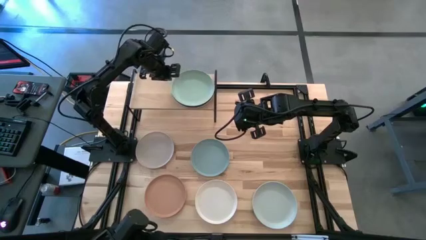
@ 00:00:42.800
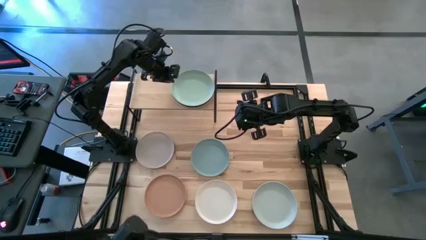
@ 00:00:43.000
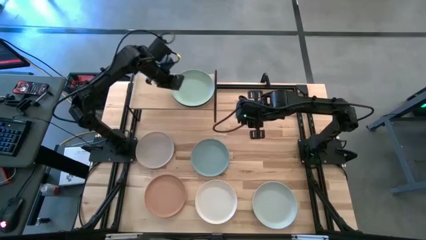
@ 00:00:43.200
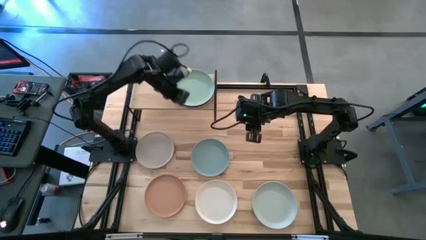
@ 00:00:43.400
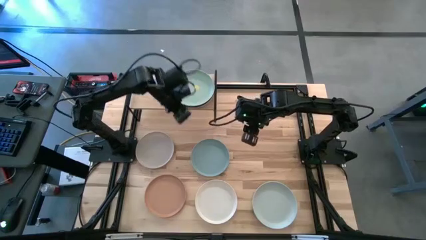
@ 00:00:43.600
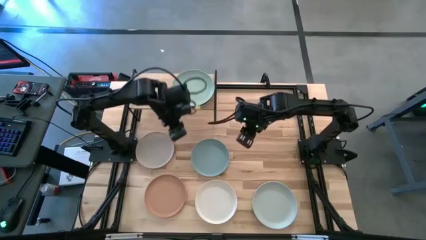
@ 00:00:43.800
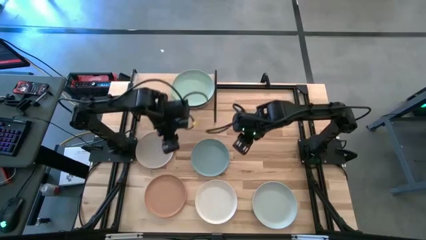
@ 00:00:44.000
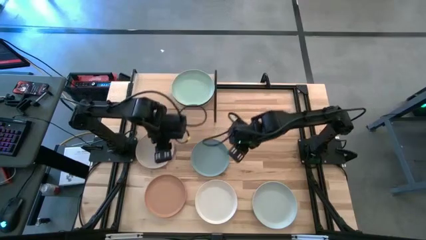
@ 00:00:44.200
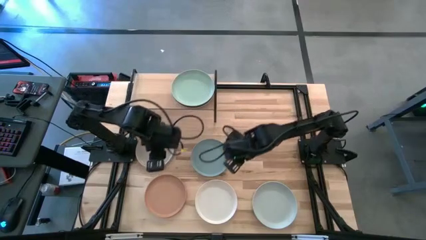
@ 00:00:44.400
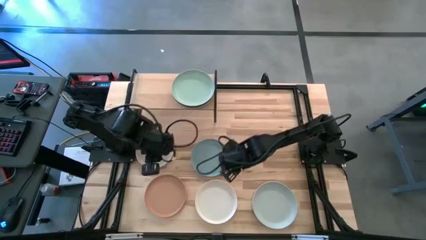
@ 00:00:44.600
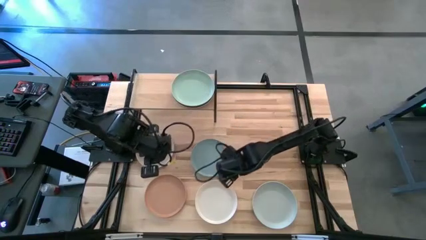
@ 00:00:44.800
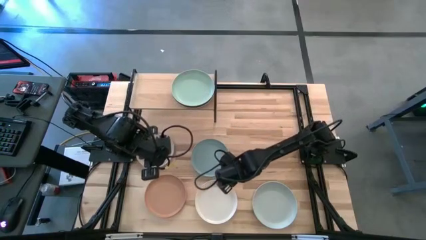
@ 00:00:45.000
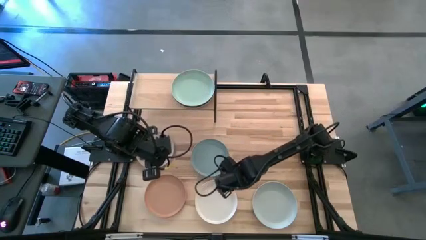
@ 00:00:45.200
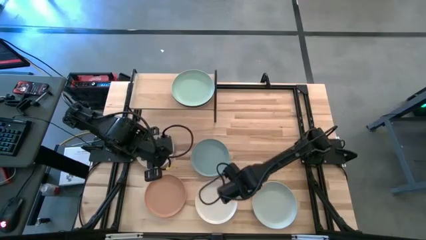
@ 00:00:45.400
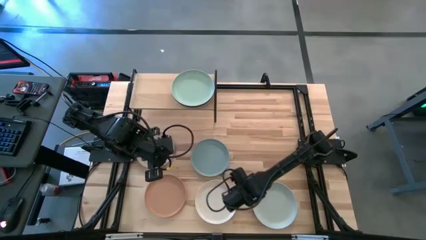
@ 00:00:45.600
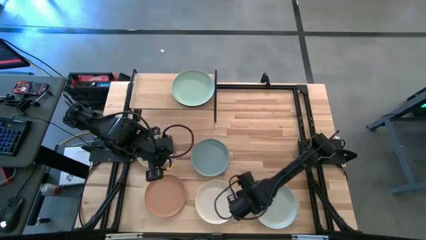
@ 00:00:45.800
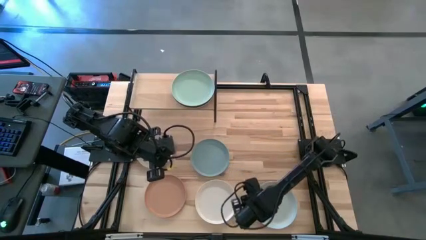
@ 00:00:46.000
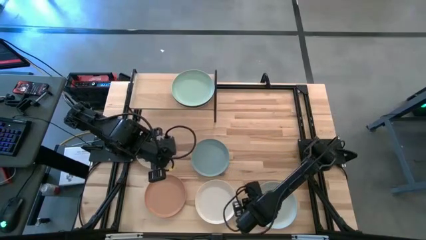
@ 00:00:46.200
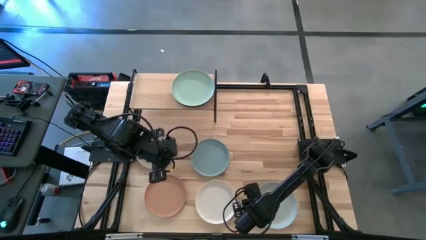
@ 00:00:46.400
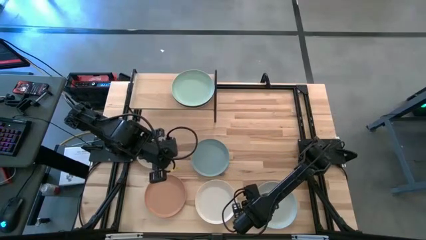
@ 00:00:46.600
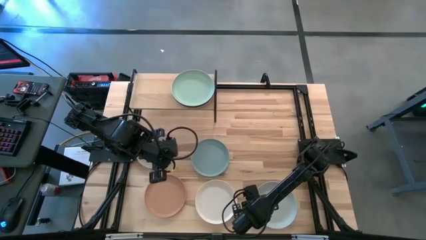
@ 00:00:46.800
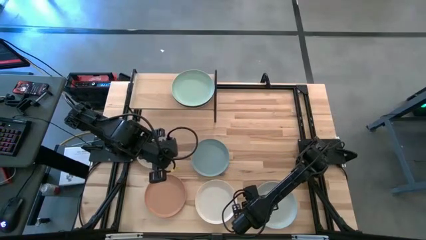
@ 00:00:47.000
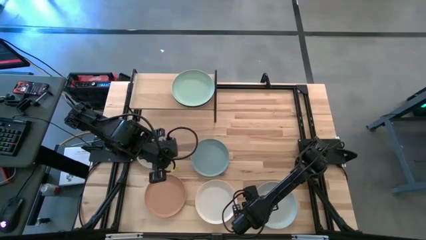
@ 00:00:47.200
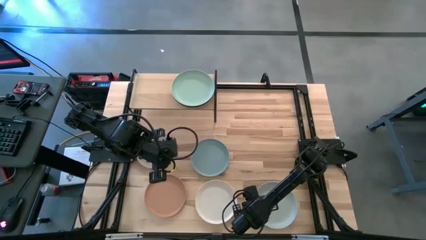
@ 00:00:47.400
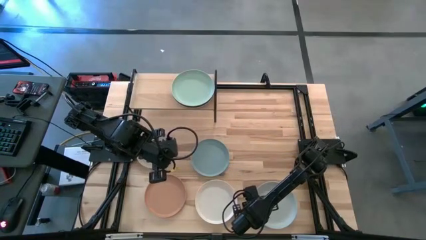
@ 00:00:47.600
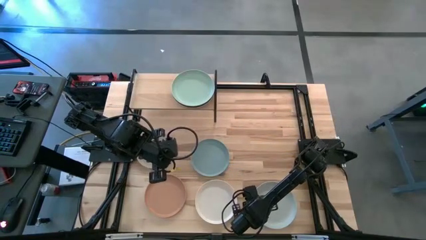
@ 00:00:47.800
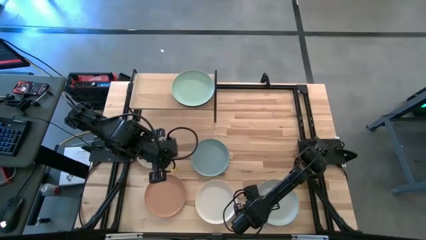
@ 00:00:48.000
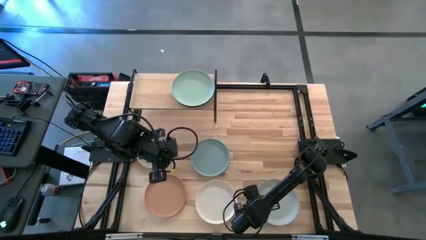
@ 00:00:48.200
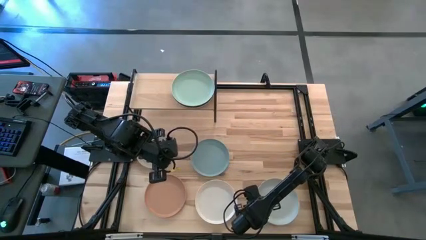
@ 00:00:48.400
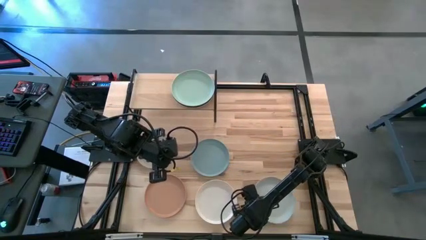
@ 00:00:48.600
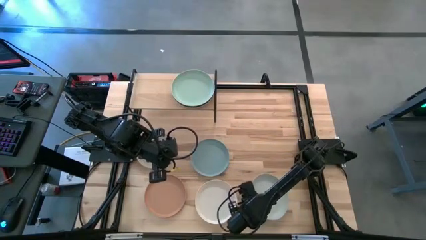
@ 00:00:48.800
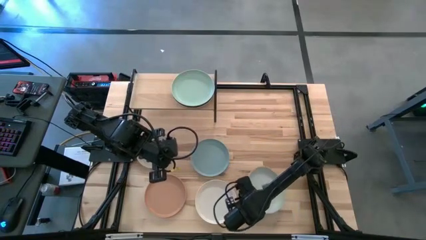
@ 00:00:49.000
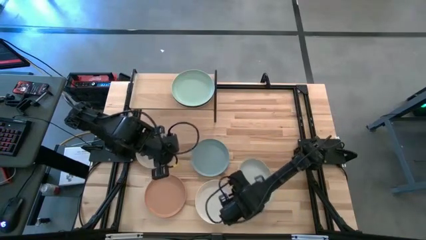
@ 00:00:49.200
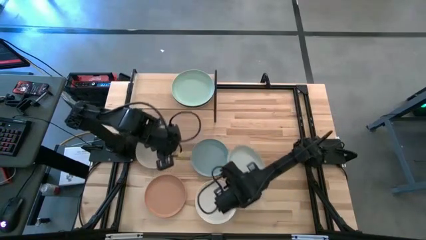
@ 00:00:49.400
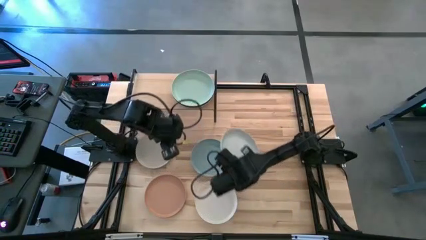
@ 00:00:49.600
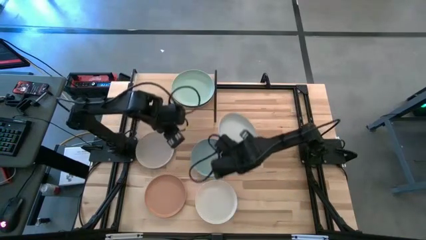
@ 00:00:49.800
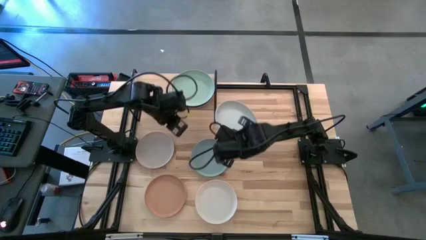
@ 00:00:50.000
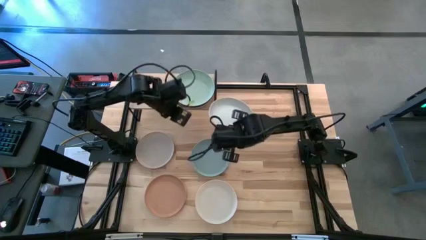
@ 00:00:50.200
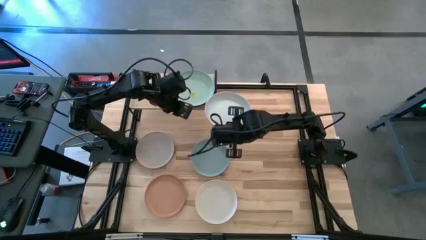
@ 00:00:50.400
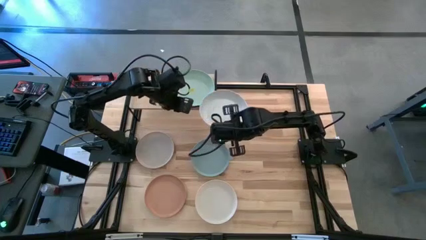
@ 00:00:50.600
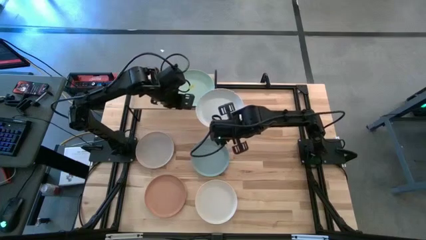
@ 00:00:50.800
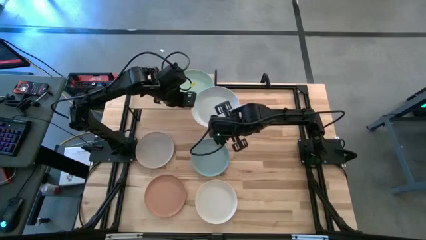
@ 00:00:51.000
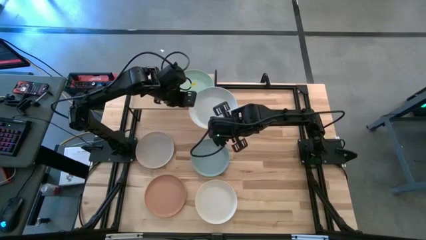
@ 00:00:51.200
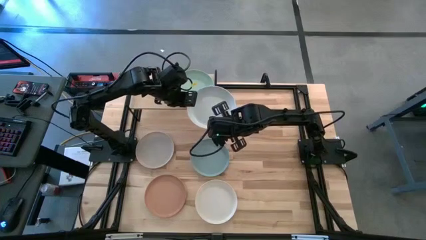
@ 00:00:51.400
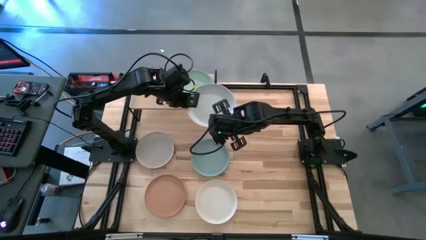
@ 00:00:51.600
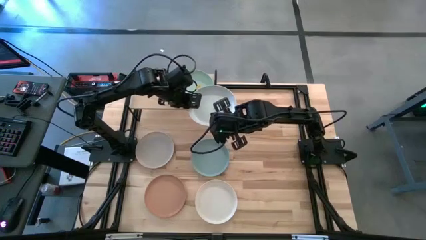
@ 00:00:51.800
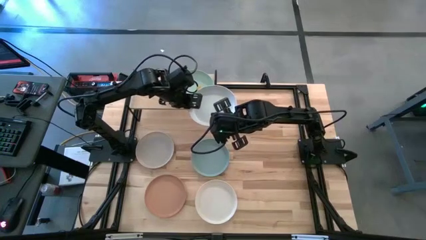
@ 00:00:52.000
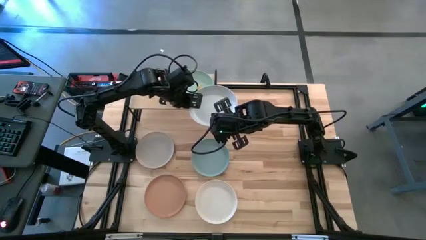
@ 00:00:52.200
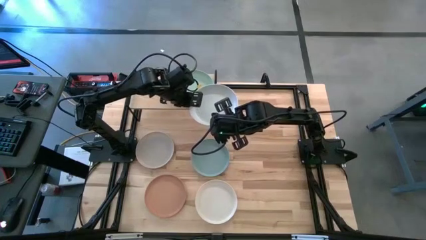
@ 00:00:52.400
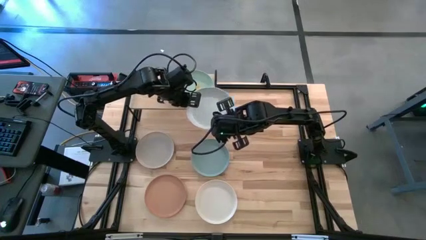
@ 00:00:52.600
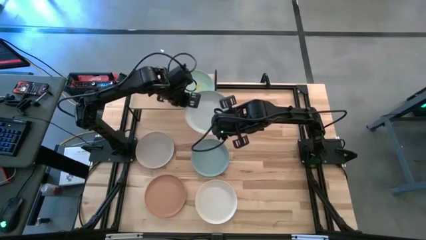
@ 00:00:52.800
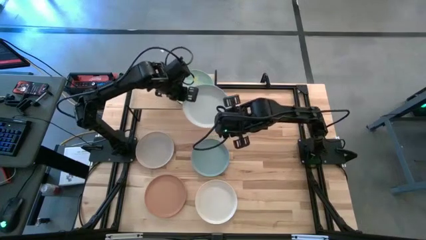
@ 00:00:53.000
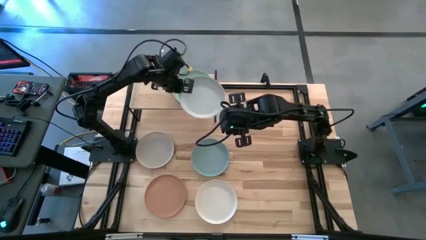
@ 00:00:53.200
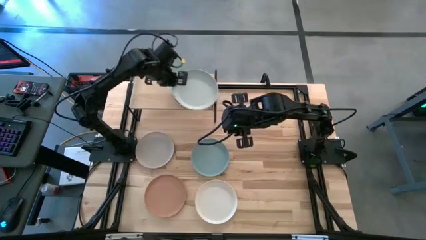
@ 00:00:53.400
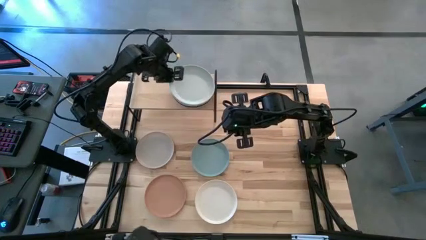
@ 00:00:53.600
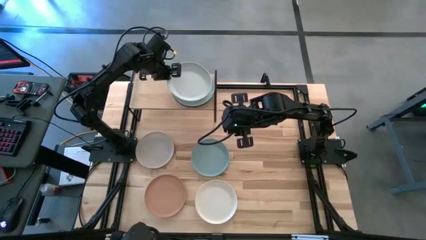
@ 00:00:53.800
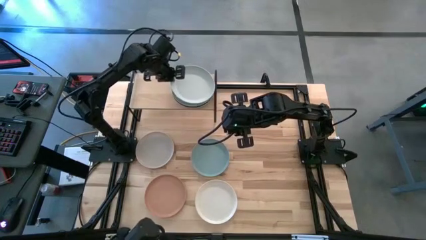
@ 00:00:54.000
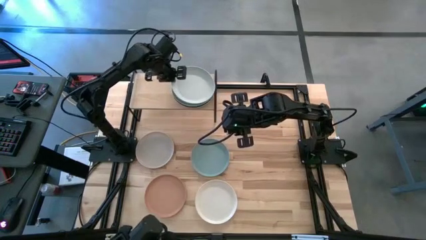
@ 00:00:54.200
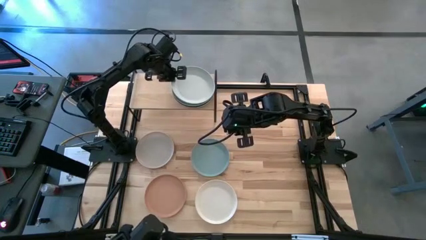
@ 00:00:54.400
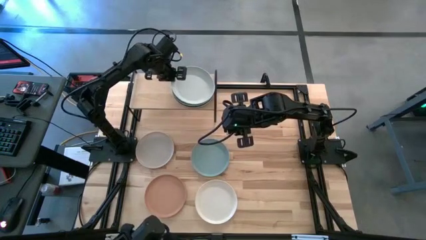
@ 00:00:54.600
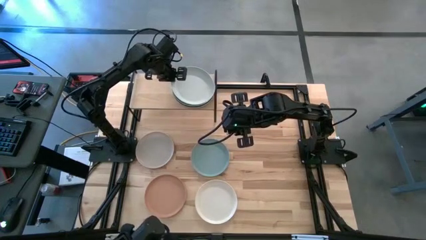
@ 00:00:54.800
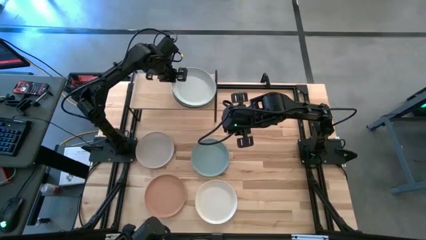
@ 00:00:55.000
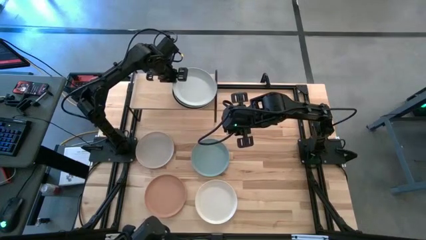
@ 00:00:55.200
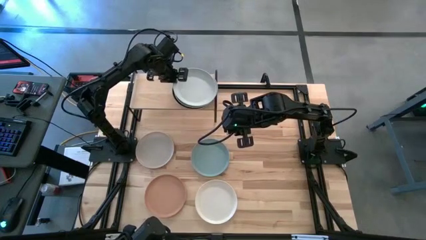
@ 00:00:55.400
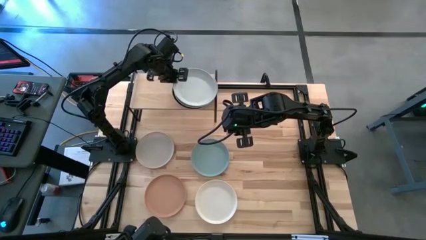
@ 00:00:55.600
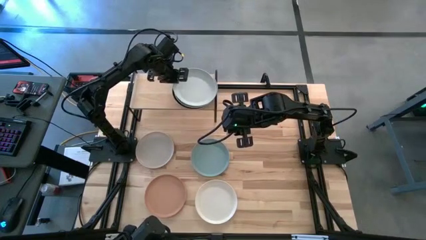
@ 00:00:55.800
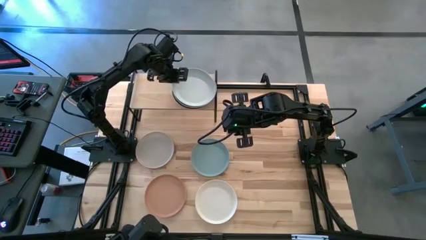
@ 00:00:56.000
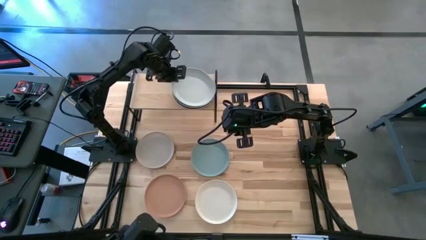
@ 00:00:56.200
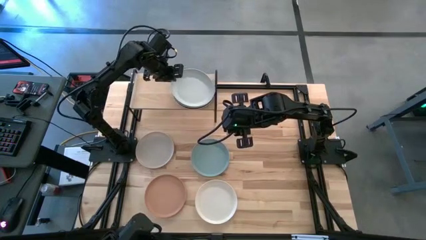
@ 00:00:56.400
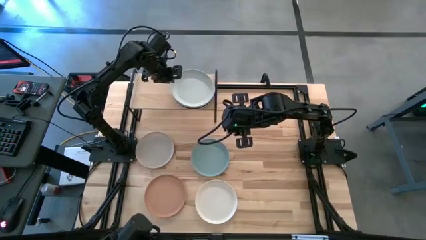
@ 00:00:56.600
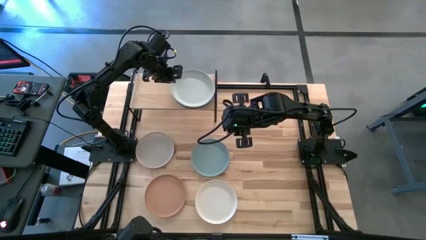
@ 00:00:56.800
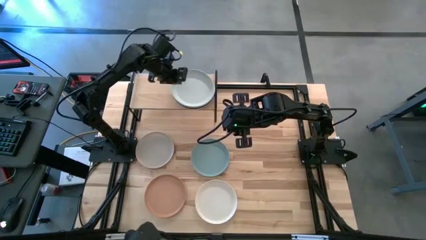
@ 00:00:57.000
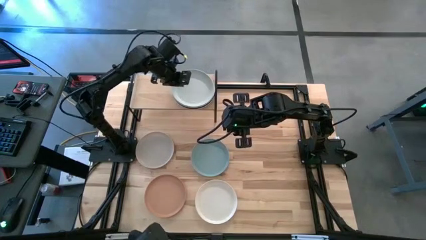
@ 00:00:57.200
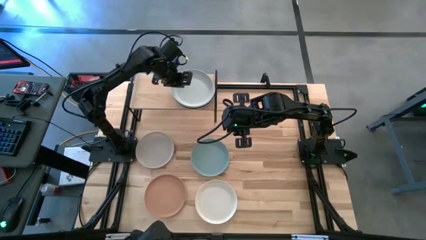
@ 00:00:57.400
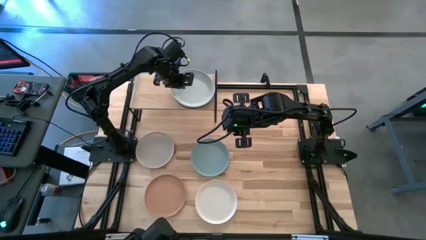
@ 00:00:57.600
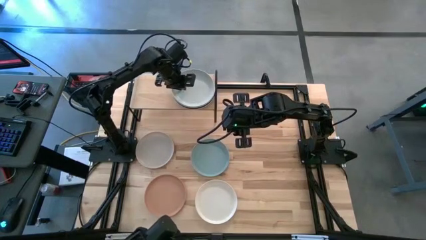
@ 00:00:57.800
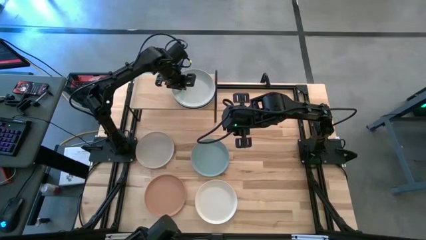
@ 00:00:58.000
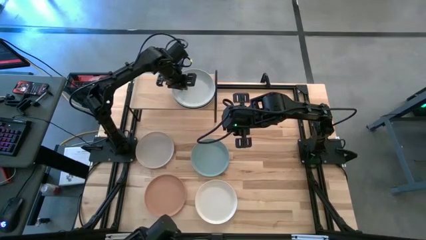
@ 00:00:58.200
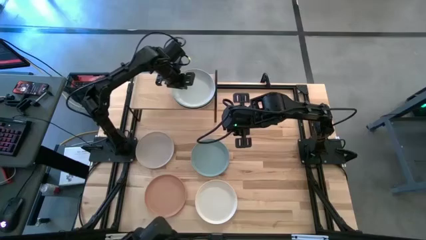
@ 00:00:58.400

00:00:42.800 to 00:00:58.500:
Task: Place and stack plates onto a shelf
Stack the gray plate into the light green plate on the shelf
